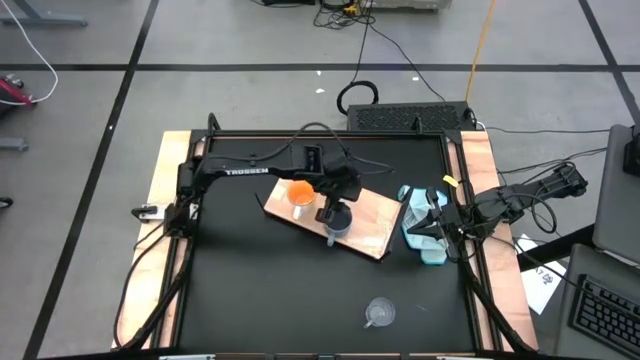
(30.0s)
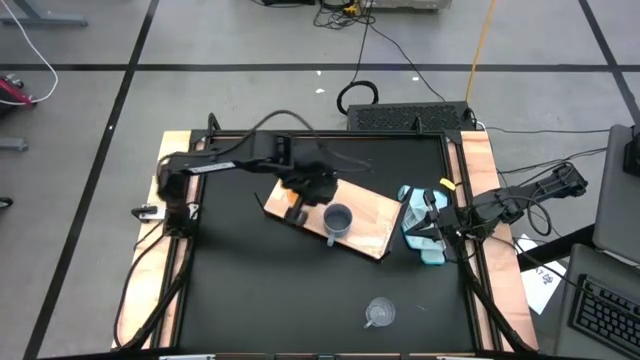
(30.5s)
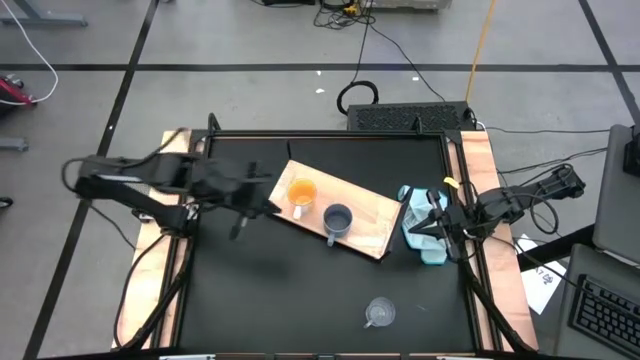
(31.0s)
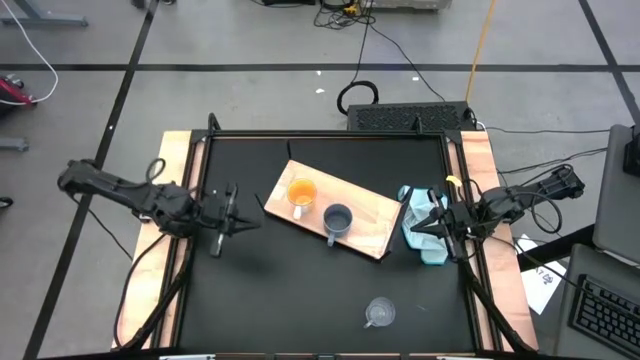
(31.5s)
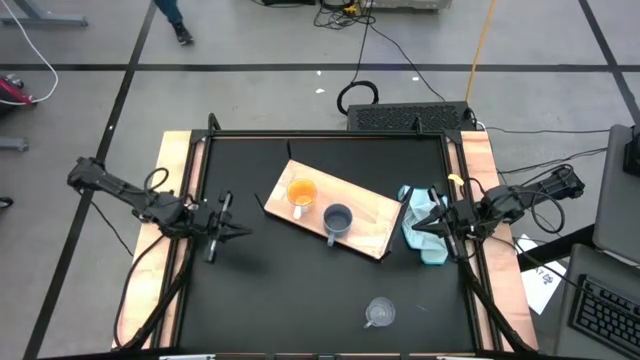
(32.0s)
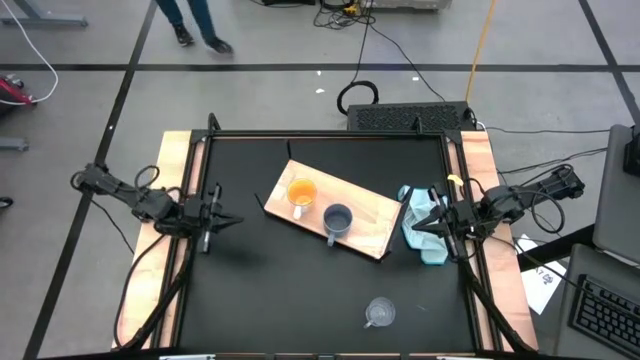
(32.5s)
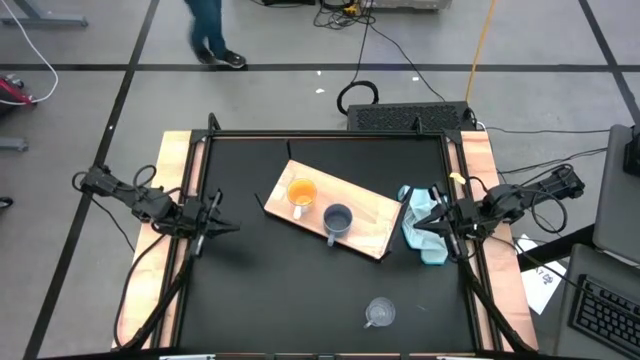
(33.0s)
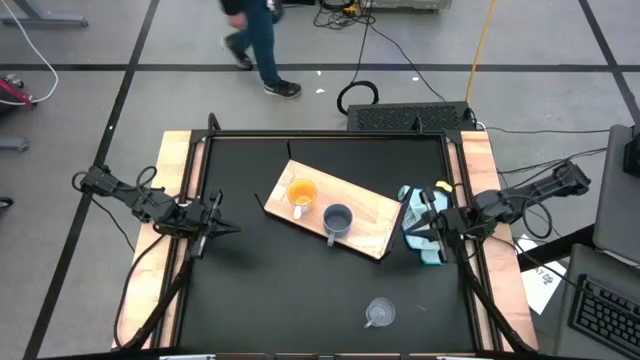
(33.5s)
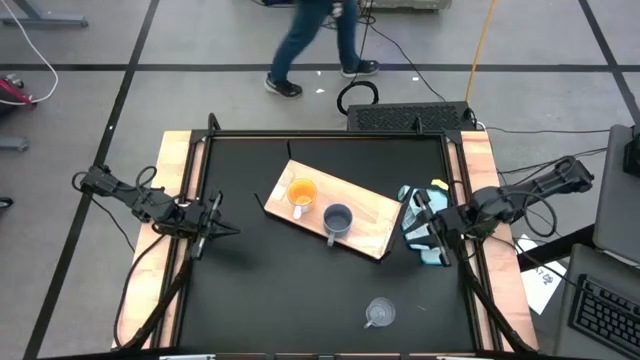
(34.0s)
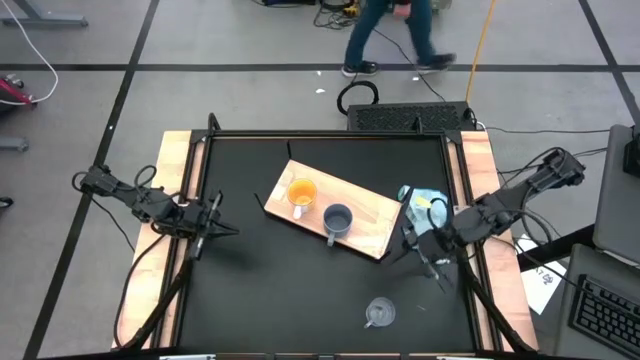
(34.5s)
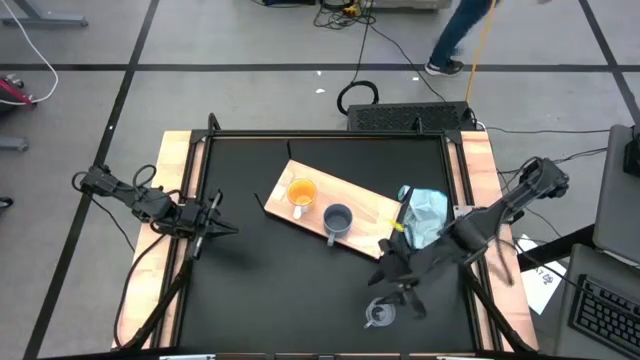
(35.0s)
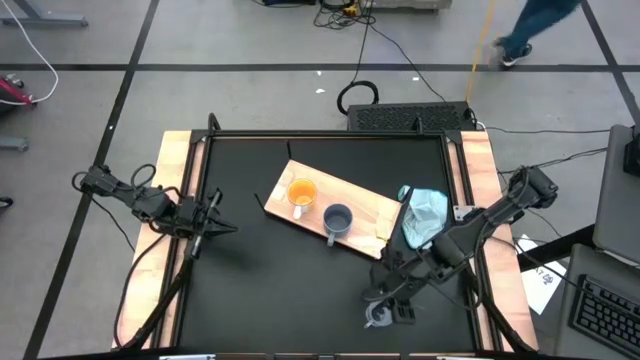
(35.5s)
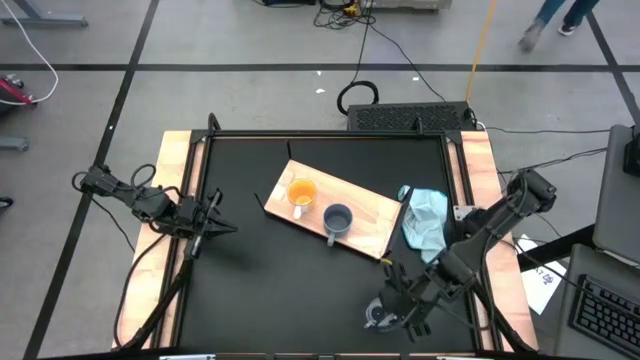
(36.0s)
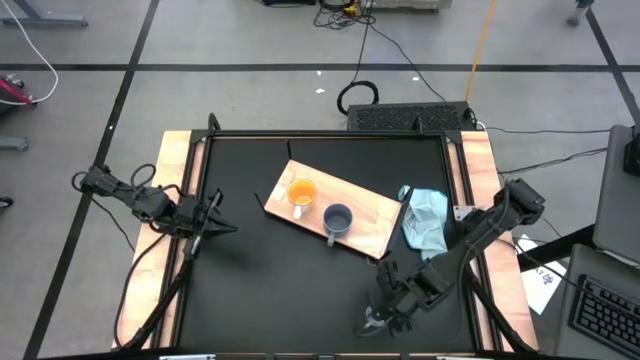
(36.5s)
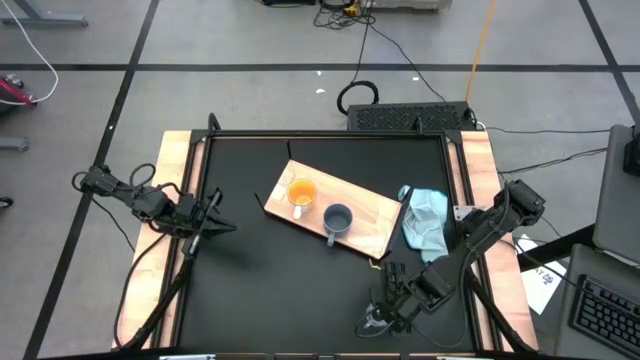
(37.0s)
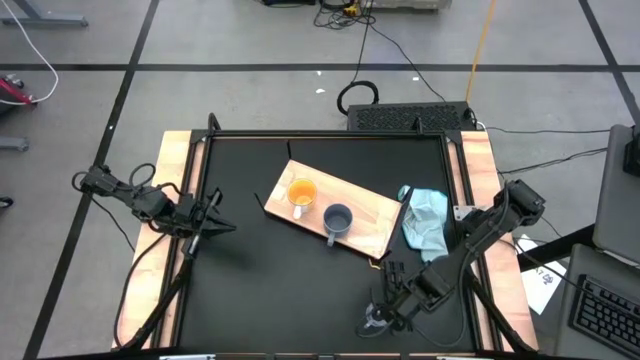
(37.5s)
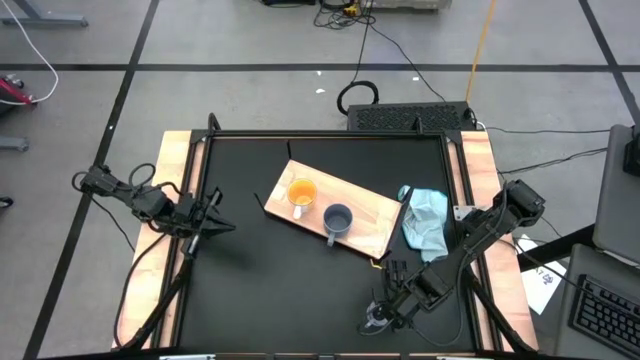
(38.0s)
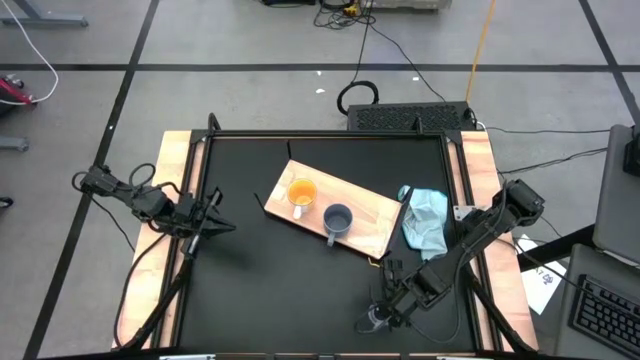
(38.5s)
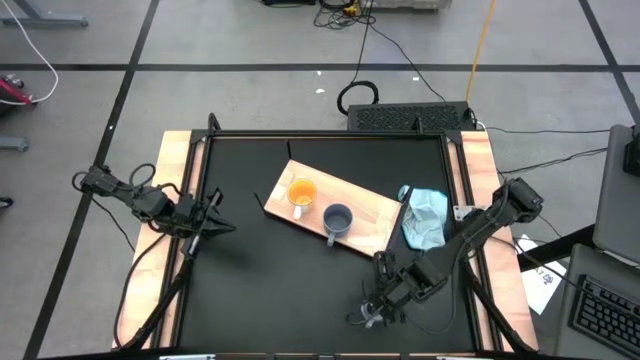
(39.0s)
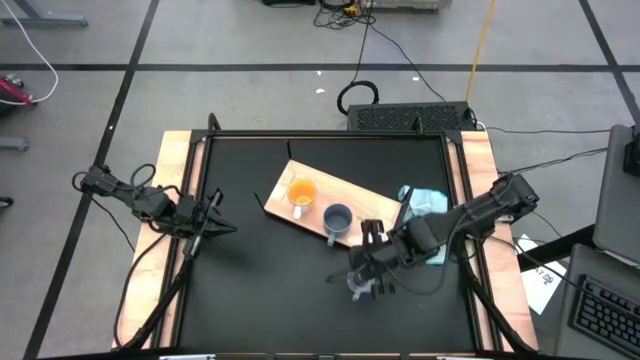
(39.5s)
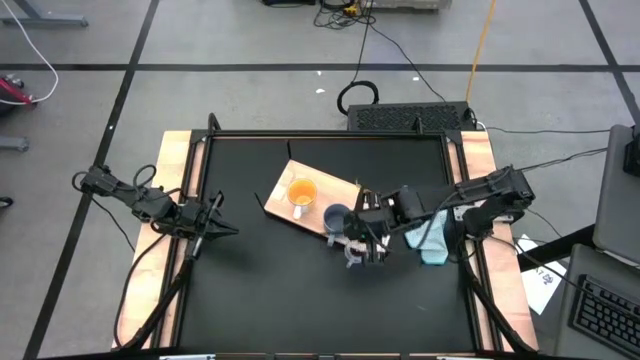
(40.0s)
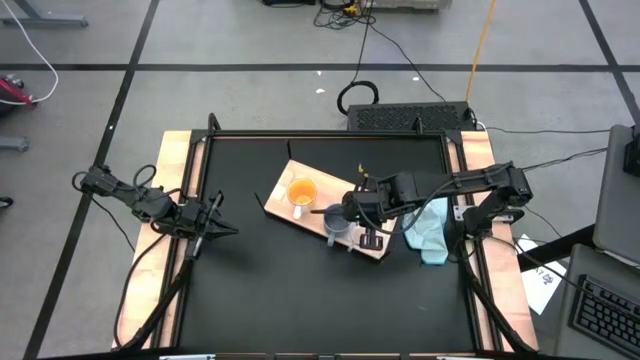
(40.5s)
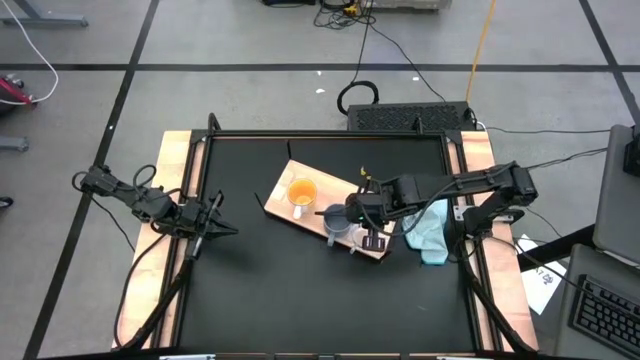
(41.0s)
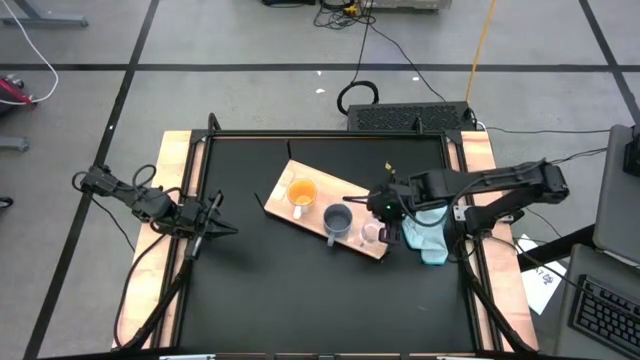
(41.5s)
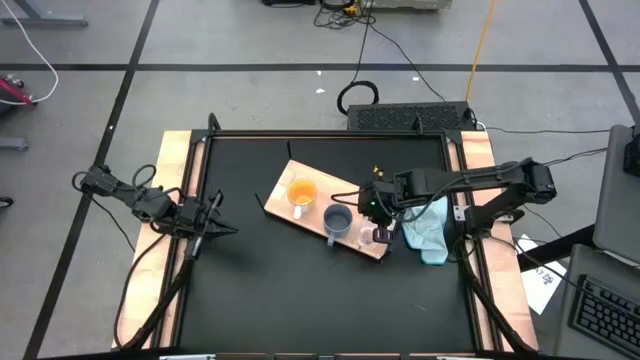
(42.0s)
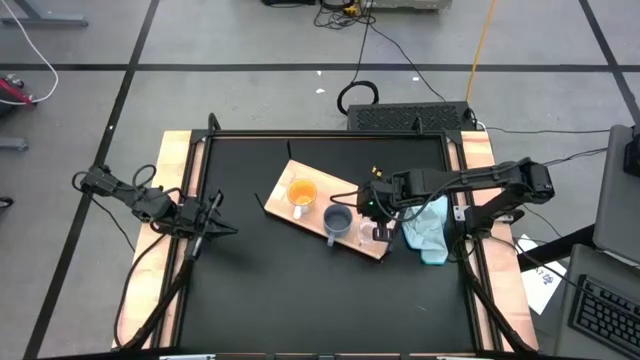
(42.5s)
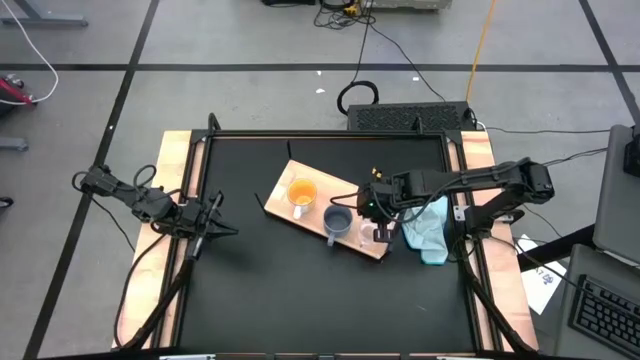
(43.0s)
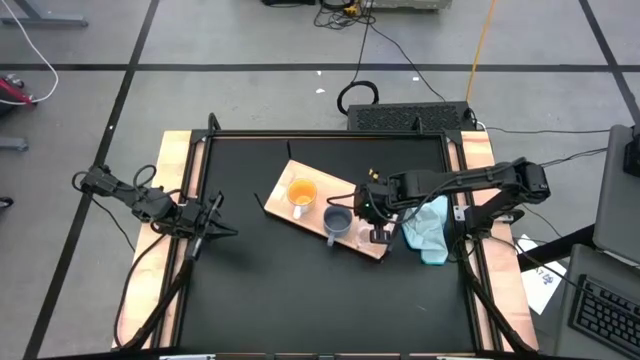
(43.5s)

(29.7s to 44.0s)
Task: Stack small to large cups/mugs on shelf
Put the transparent mug on the shelf

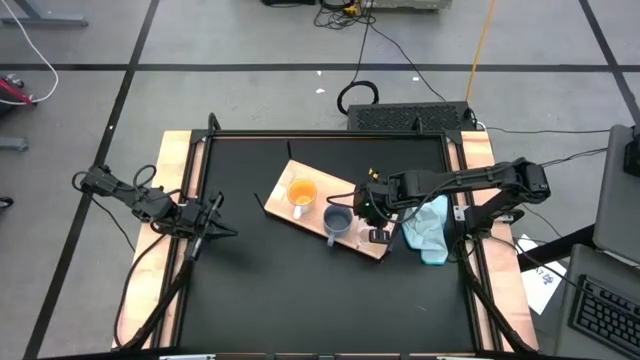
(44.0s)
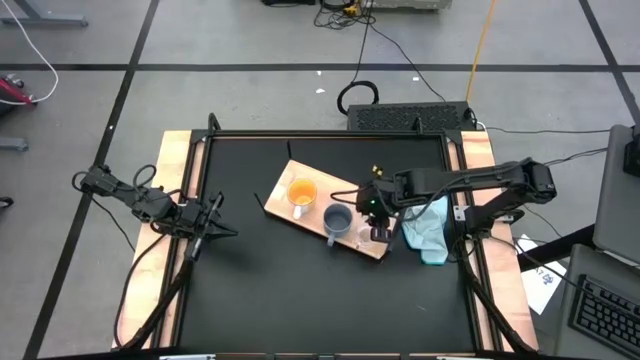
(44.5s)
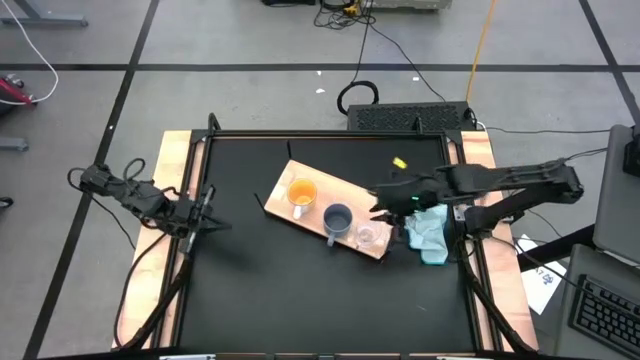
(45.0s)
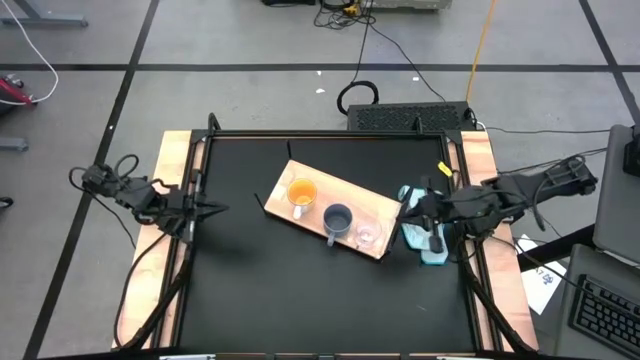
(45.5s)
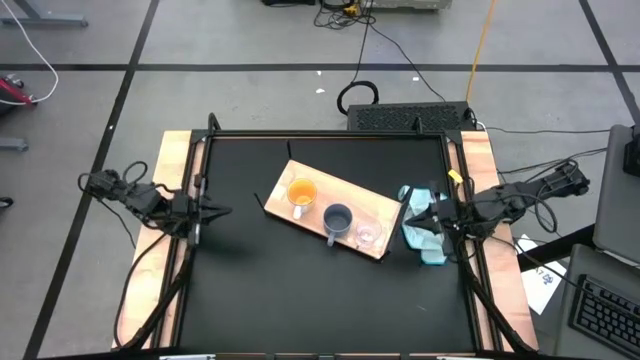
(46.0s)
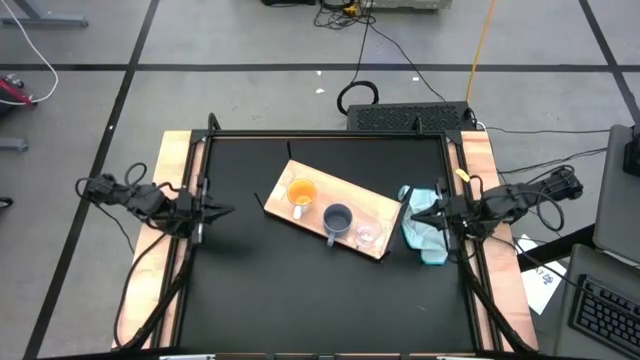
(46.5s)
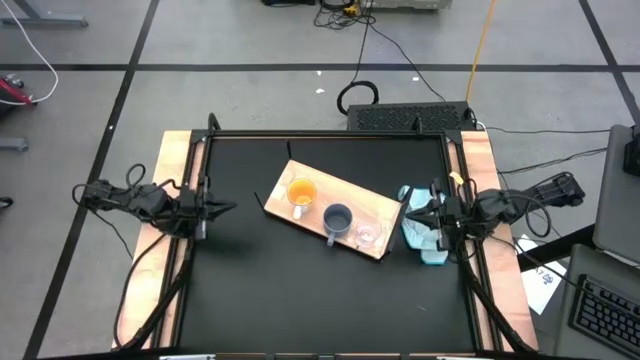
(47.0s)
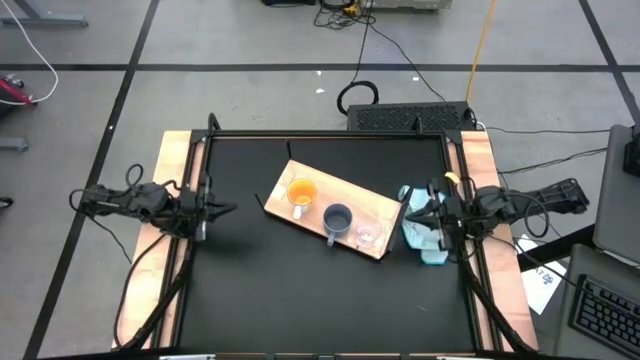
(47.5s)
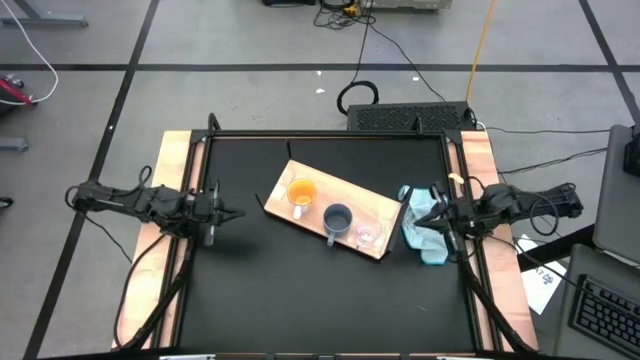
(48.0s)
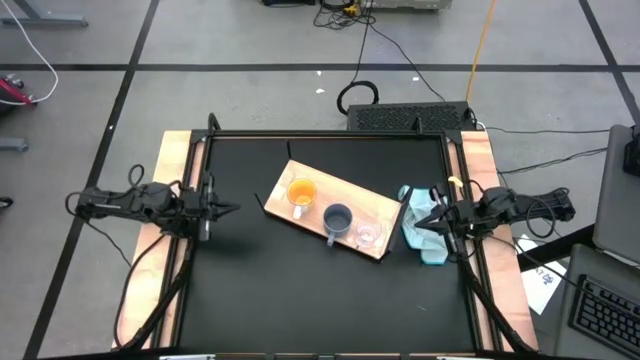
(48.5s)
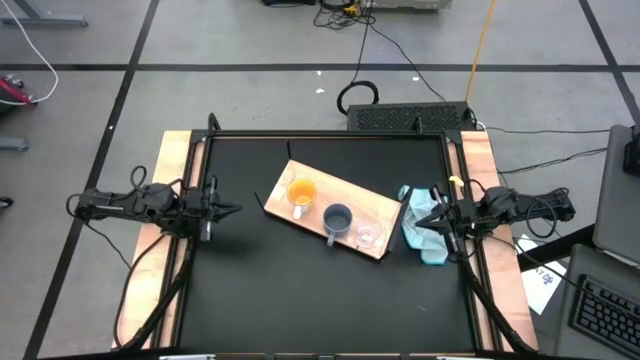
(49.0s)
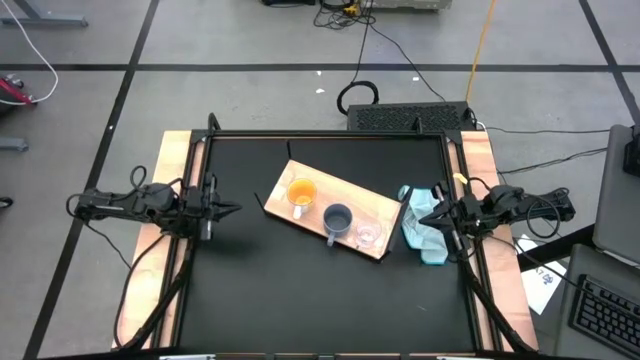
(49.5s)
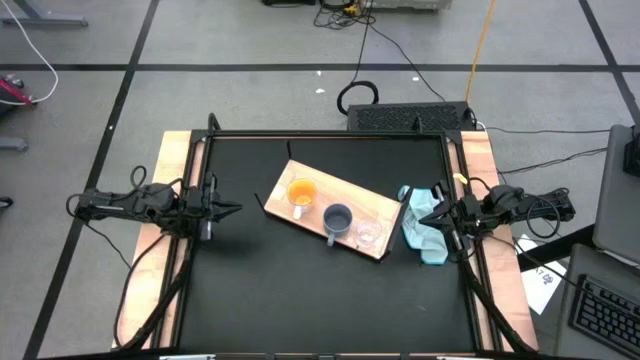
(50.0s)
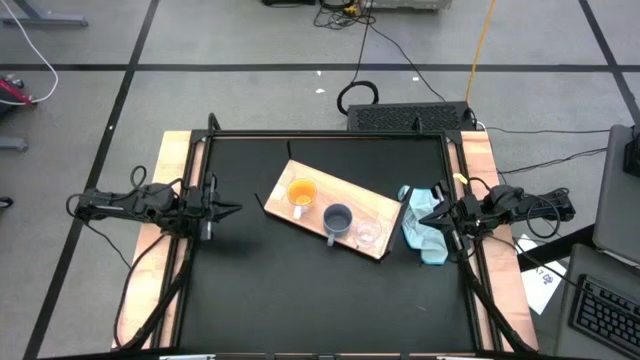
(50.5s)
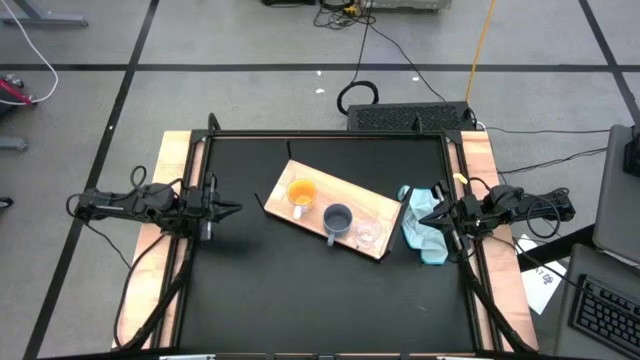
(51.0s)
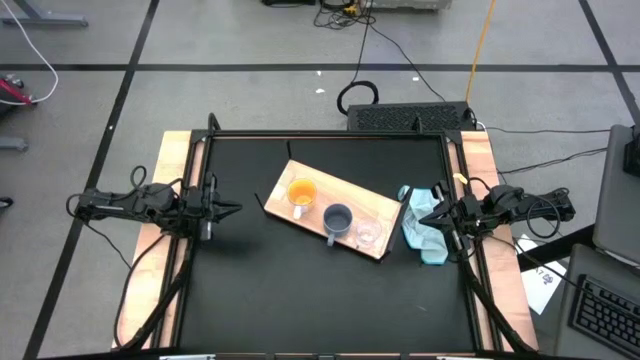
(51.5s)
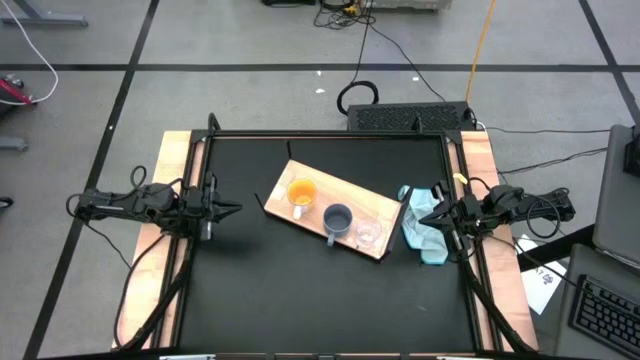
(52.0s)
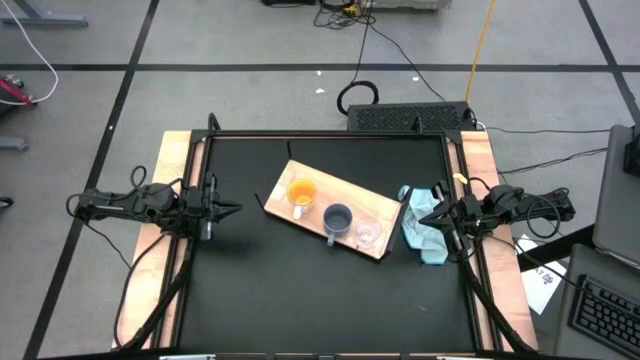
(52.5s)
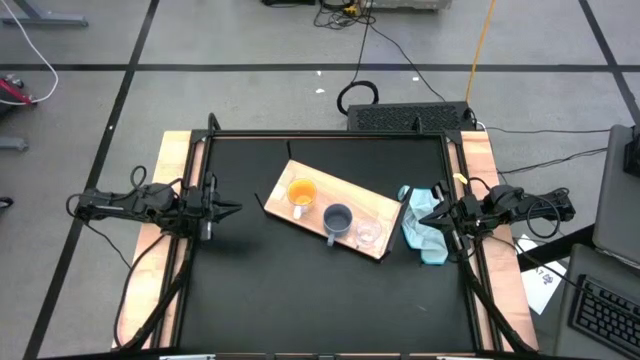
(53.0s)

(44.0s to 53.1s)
Return to Home Position
